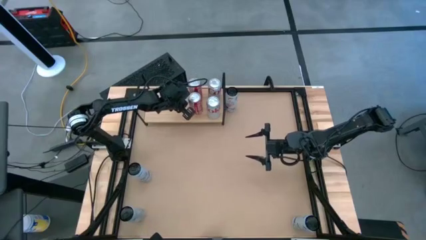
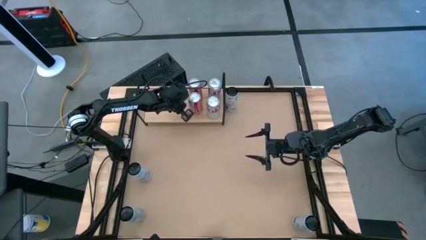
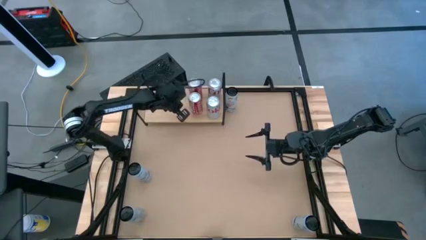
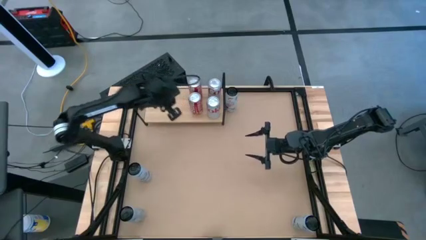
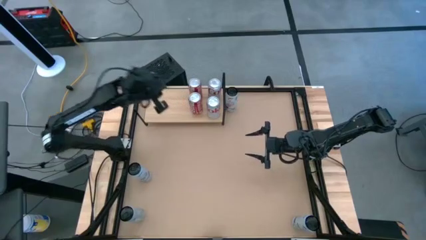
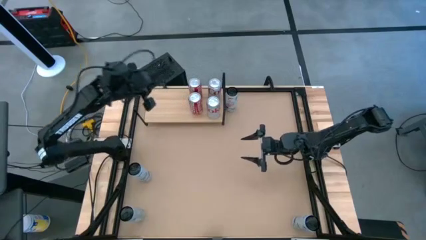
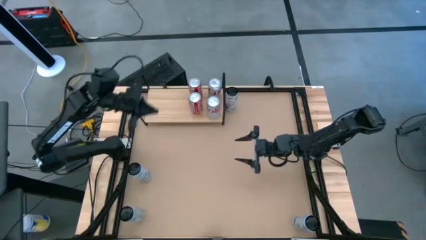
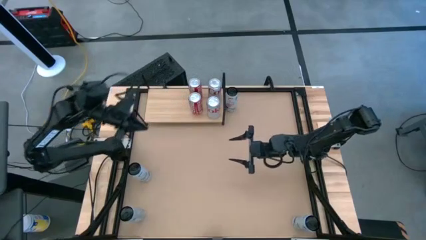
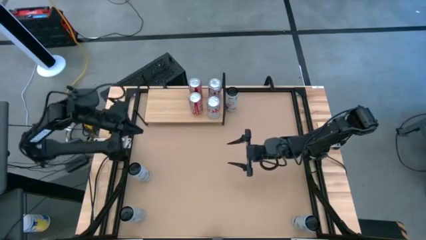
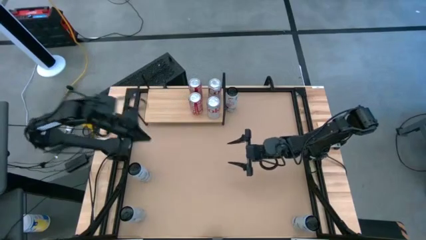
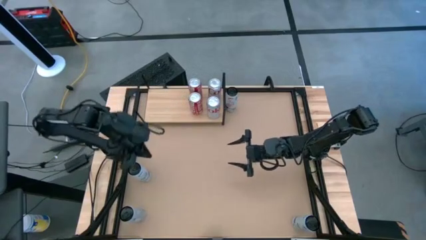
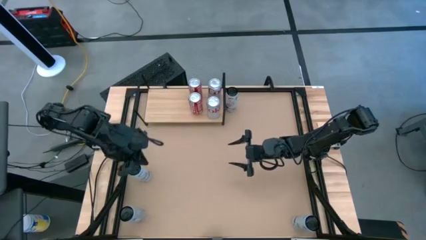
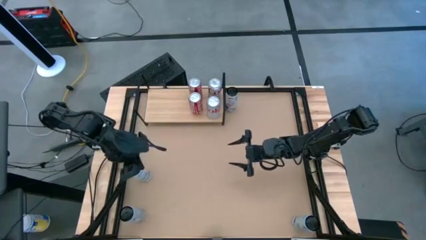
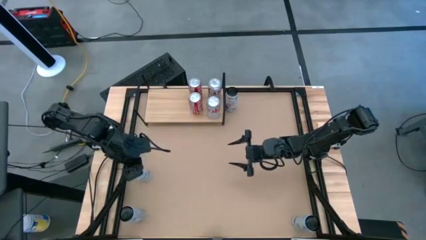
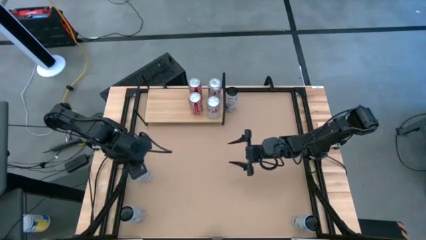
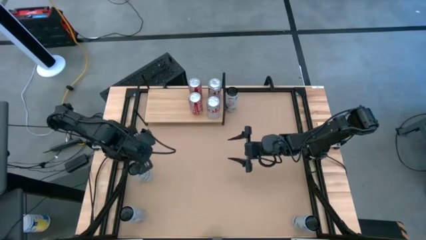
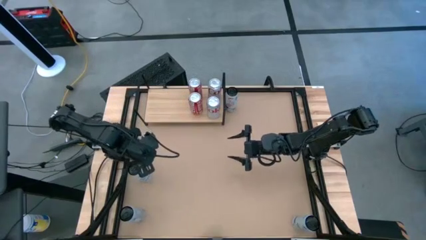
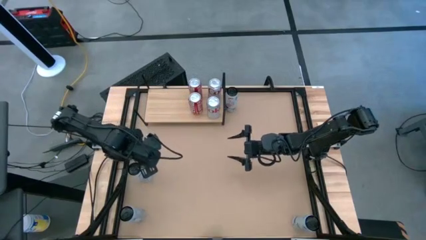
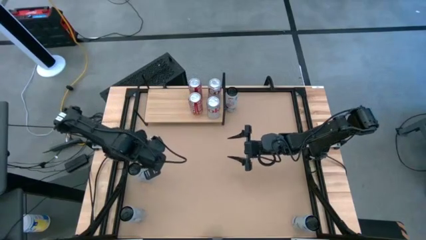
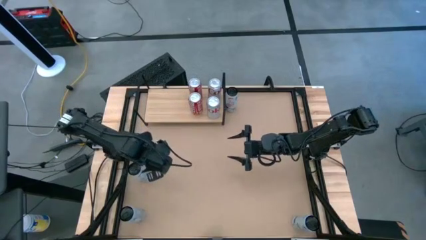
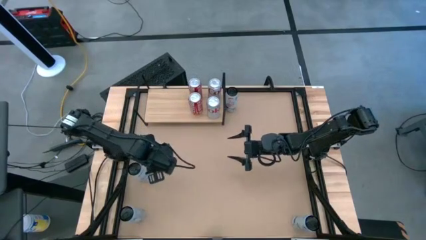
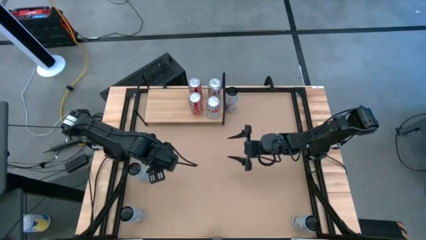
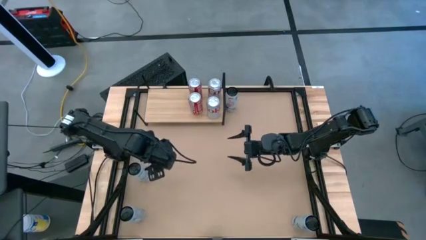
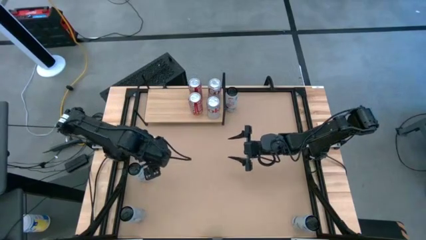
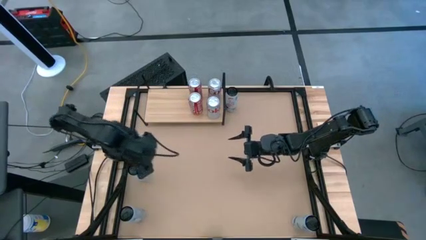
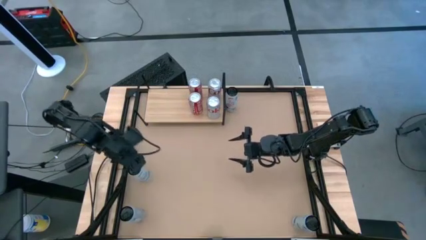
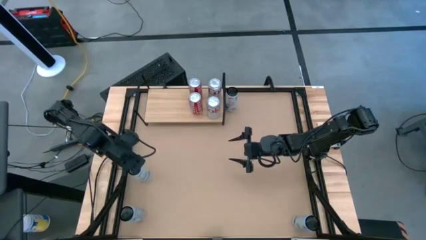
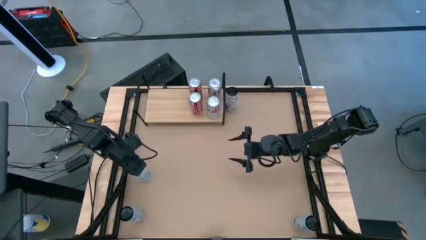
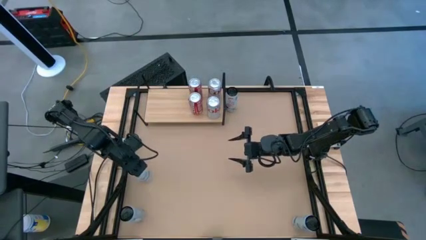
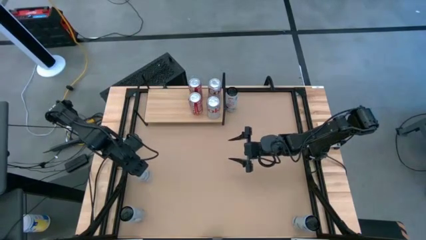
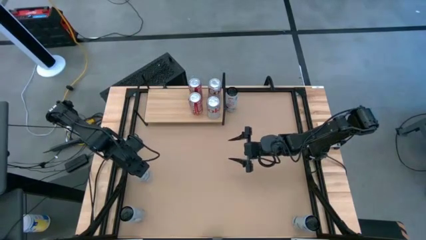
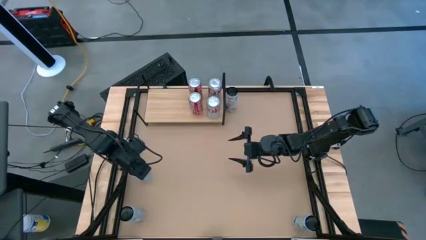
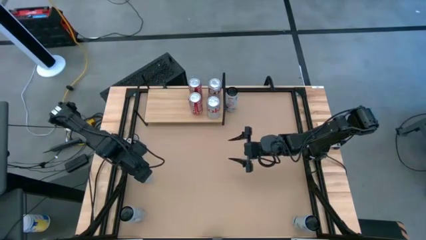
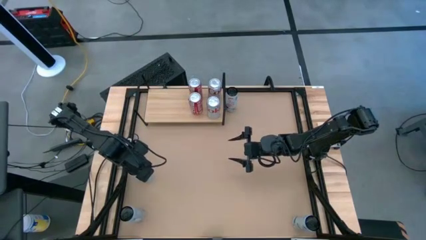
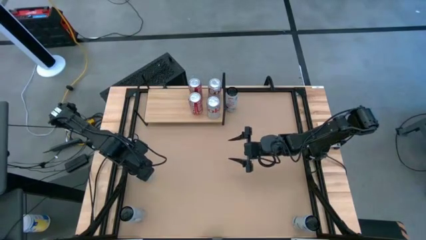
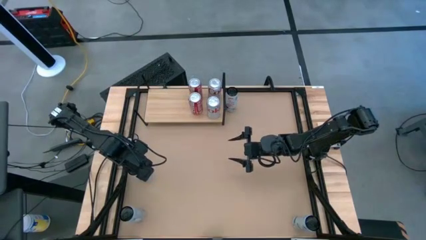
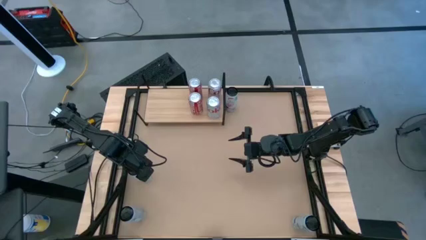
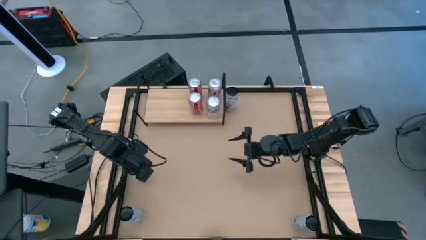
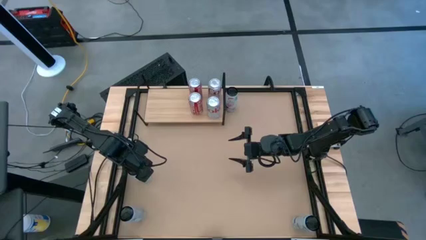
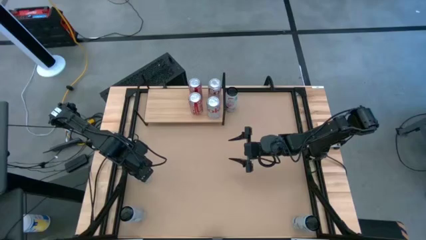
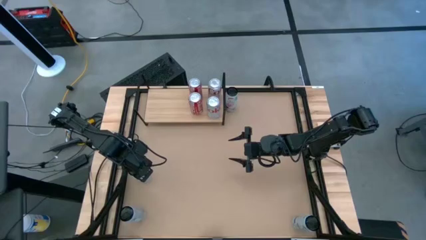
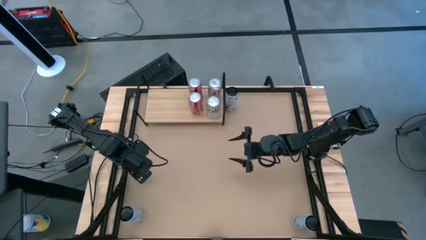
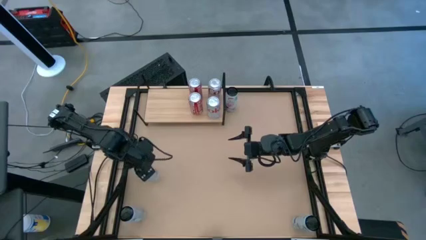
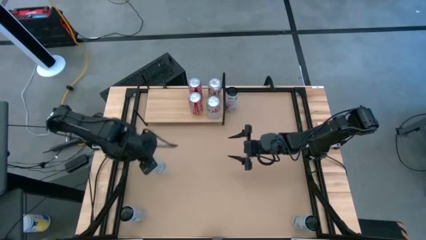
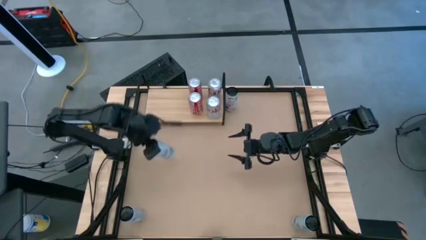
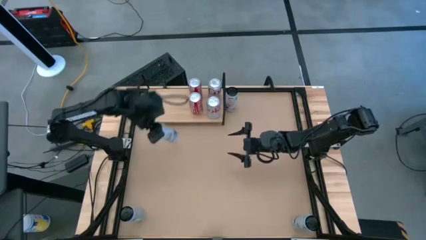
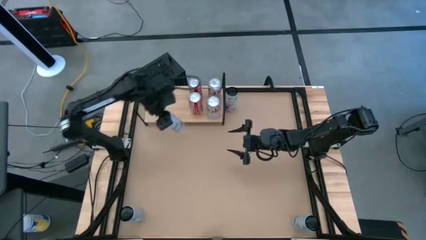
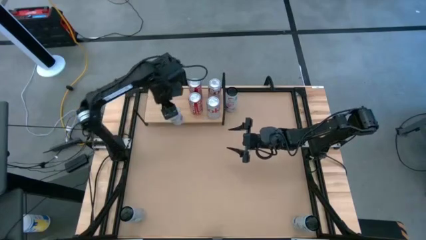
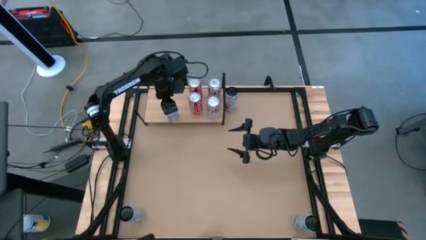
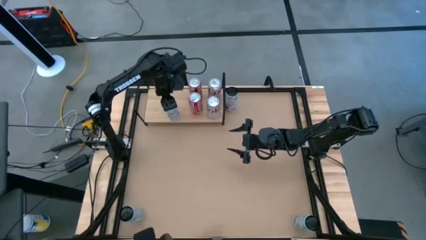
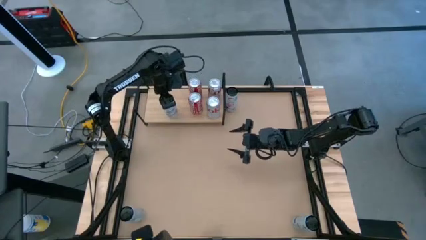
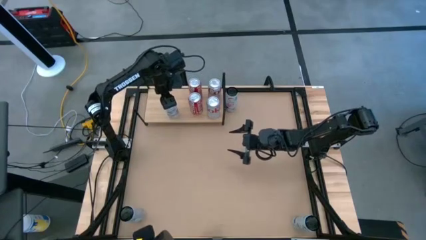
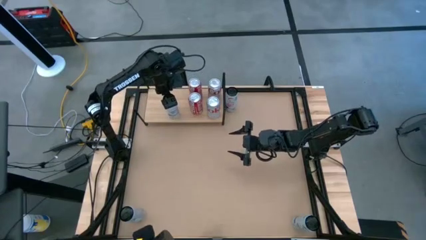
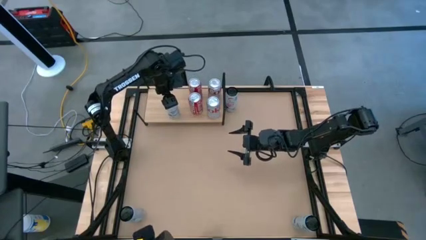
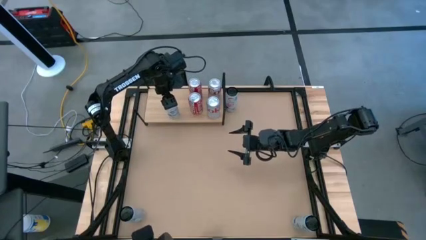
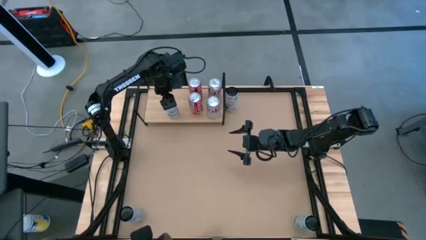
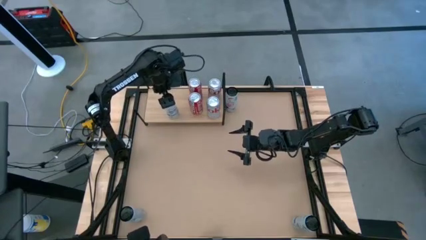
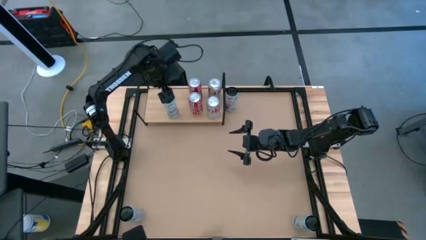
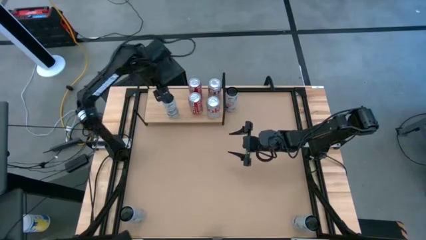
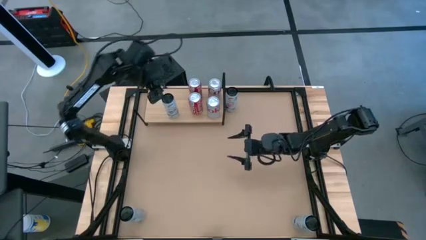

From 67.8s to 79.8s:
Task: Place canned beverage on shelf
Put the left white and blue soda can on the shelf

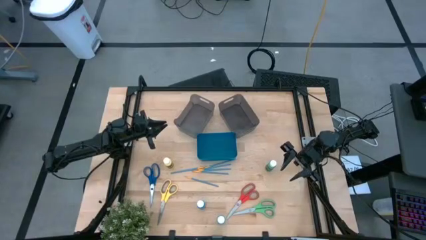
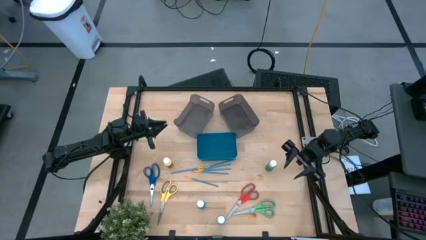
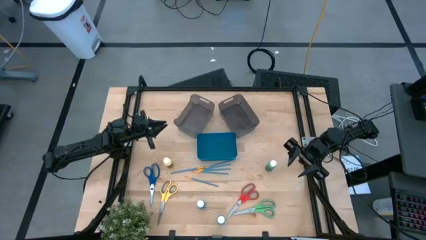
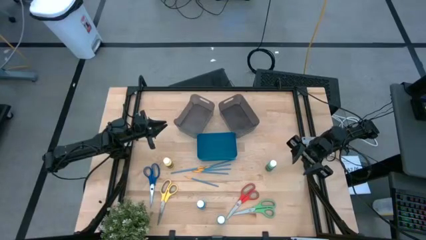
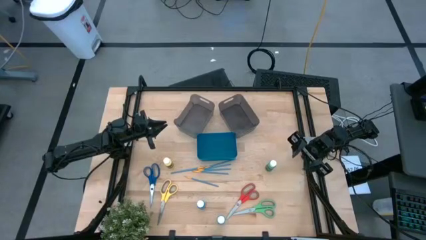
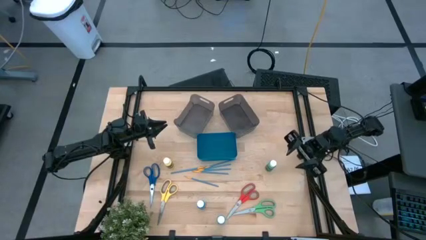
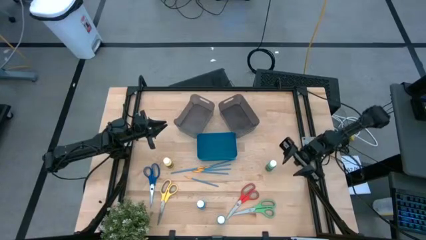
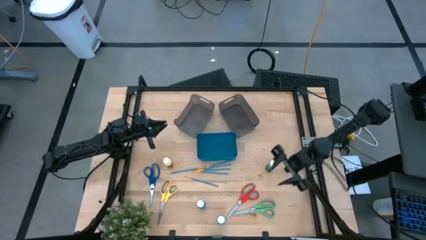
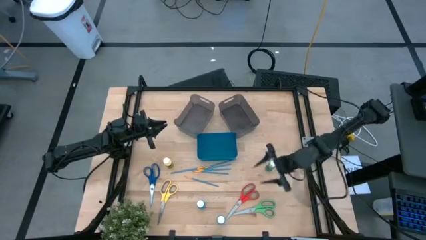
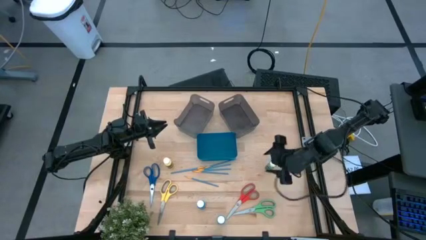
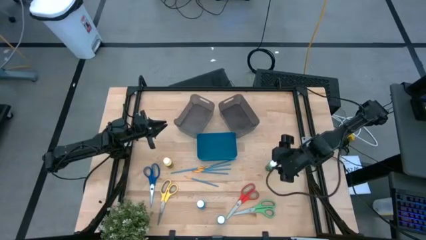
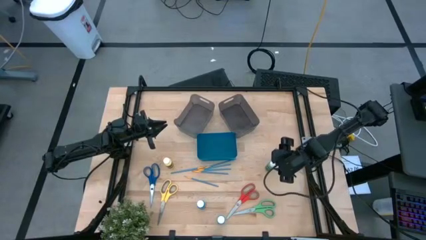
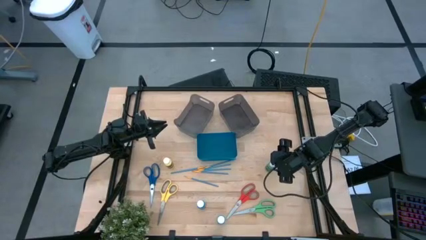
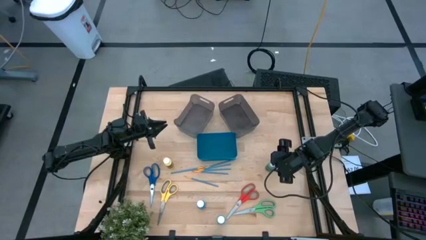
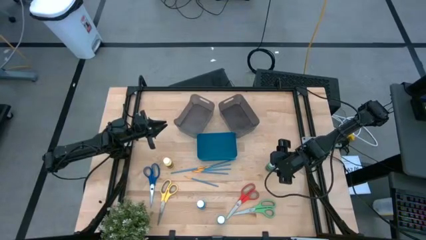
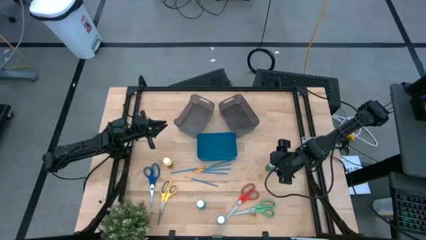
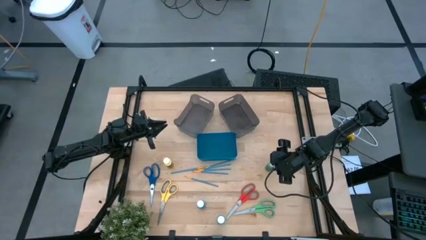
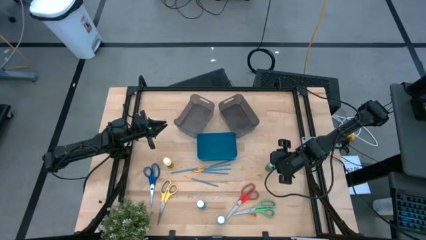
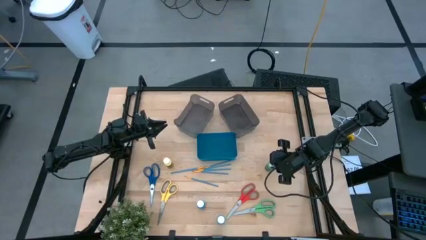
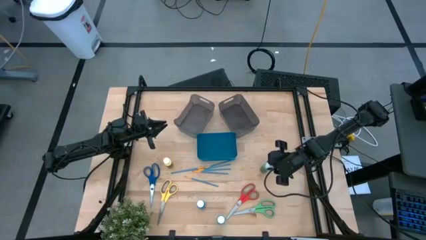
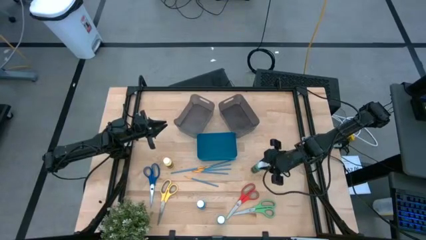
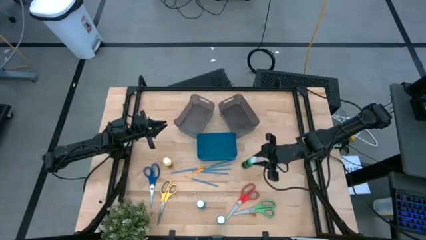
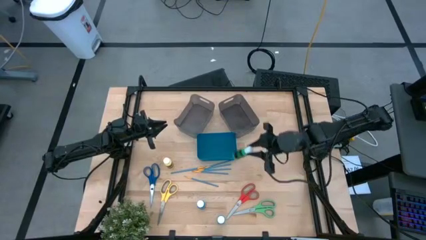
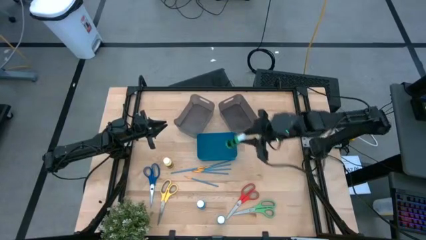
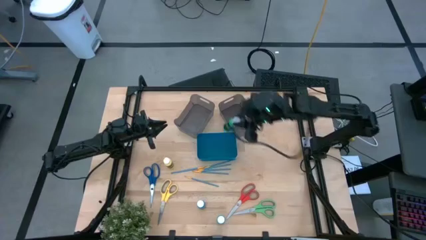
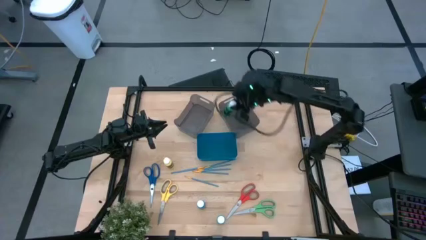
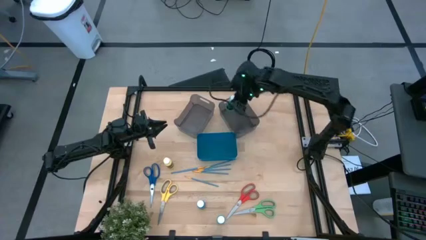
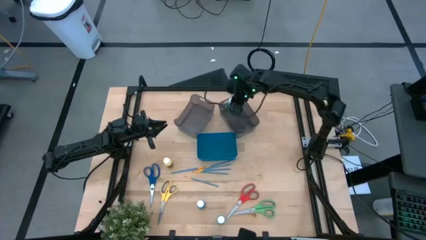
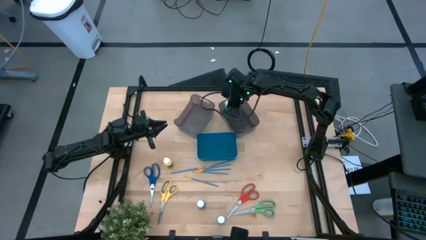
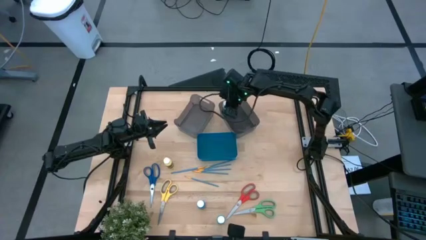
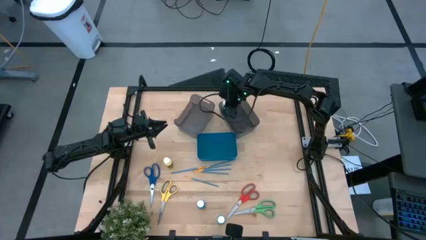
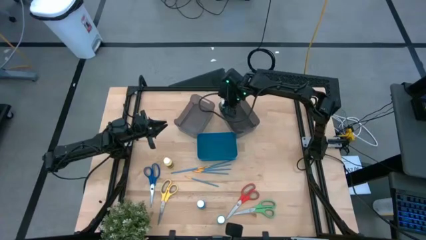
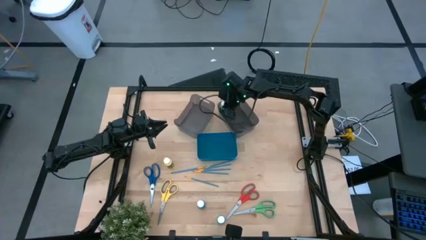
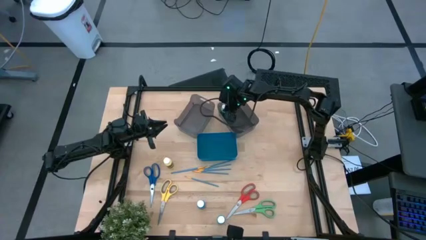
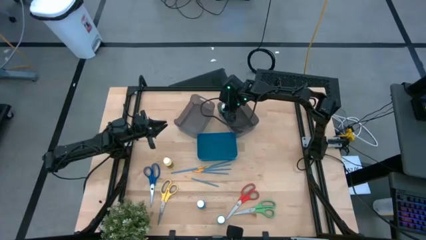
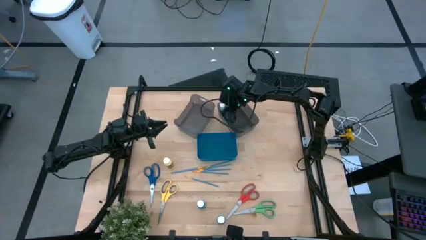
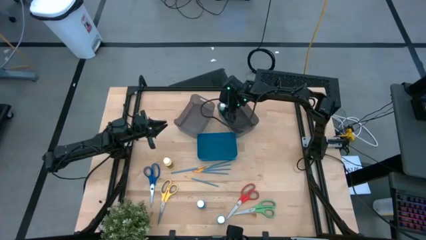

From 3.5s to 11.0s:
Task: Pick & Place Paint Supplies
Put the green paint bottle into the right black bin
